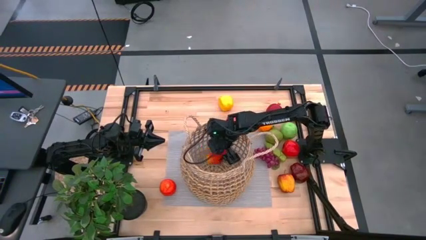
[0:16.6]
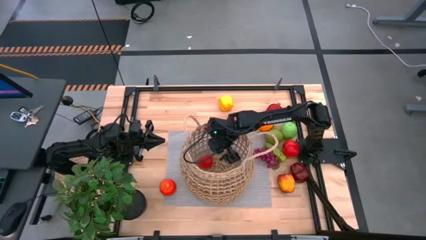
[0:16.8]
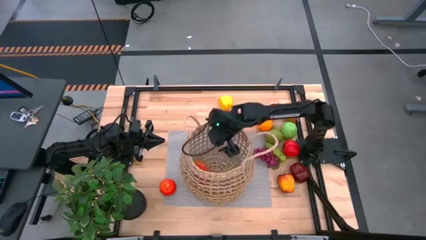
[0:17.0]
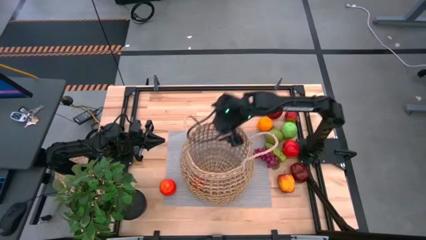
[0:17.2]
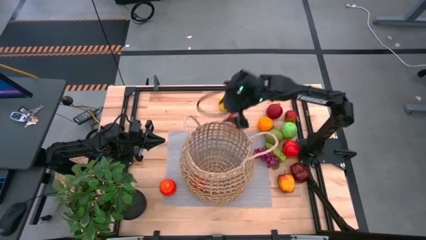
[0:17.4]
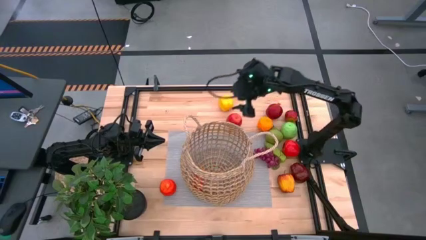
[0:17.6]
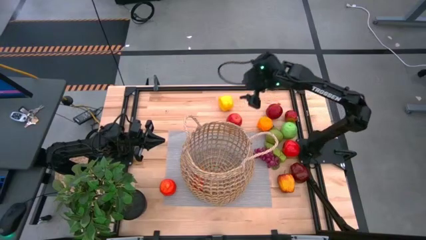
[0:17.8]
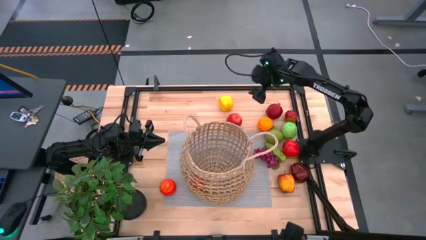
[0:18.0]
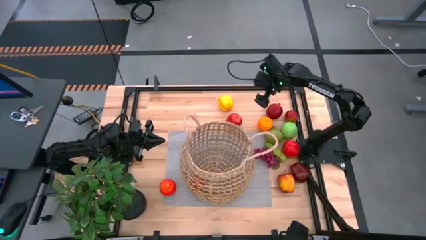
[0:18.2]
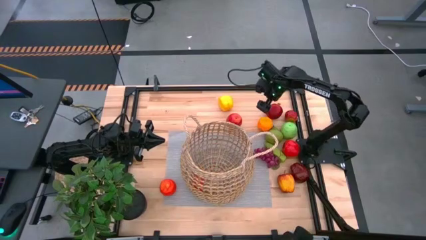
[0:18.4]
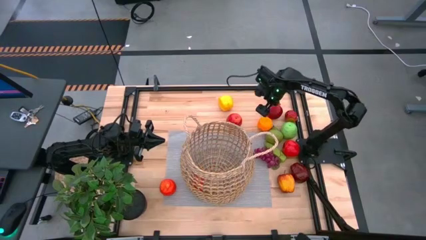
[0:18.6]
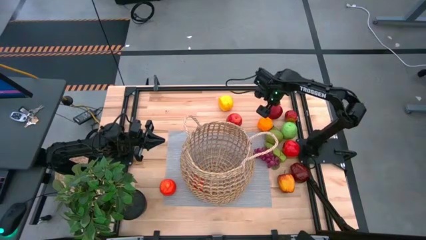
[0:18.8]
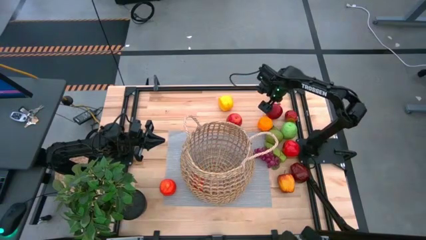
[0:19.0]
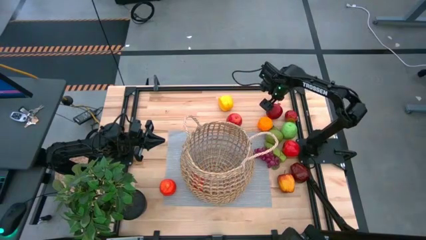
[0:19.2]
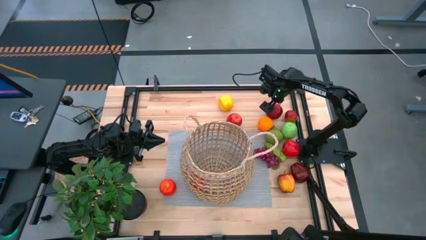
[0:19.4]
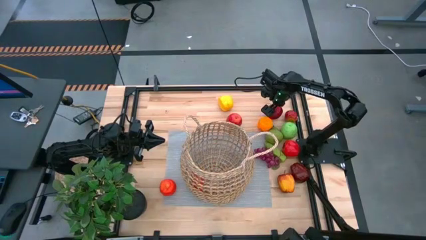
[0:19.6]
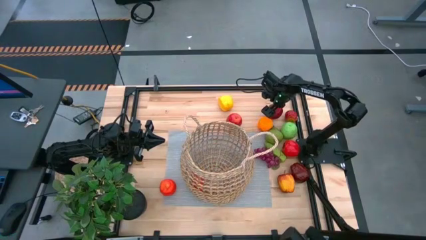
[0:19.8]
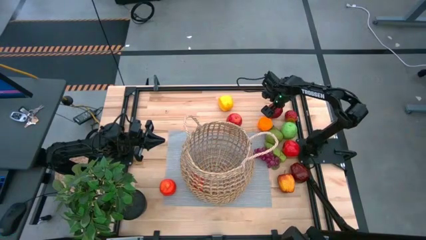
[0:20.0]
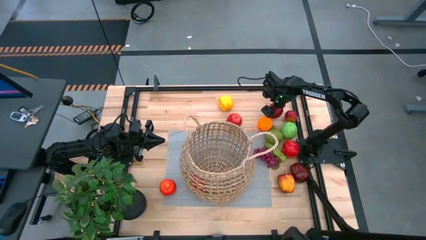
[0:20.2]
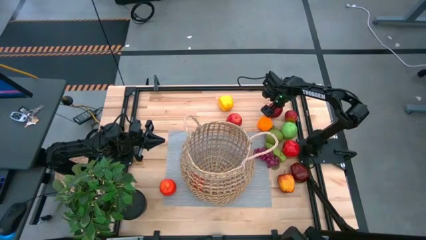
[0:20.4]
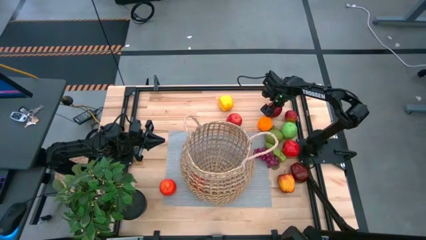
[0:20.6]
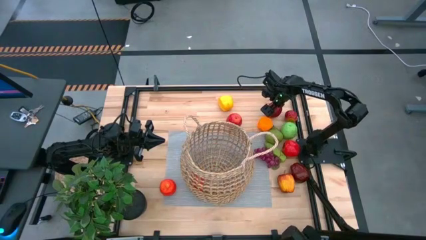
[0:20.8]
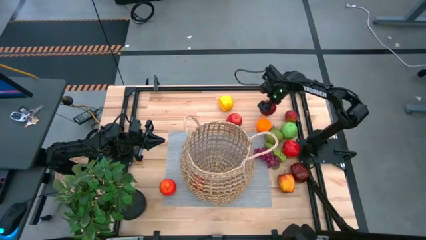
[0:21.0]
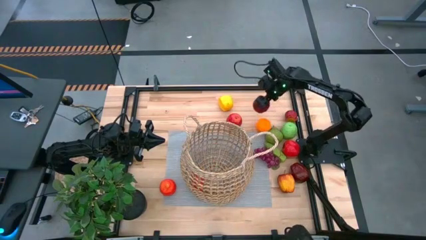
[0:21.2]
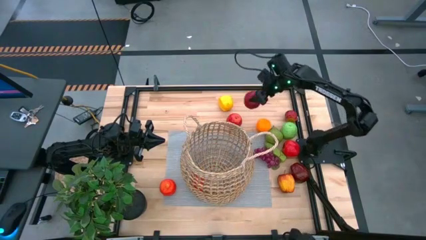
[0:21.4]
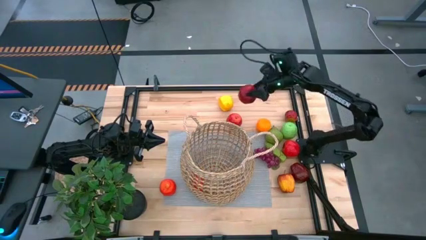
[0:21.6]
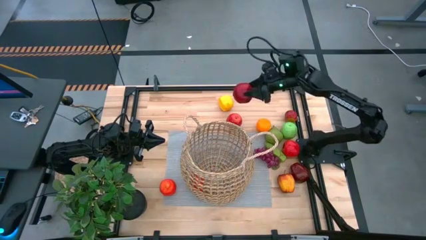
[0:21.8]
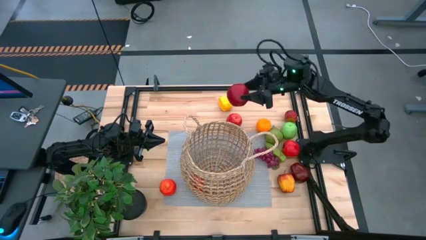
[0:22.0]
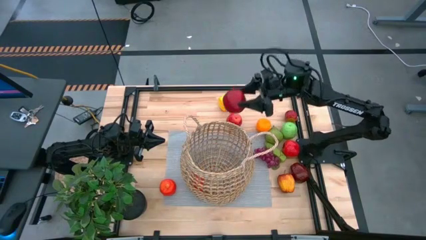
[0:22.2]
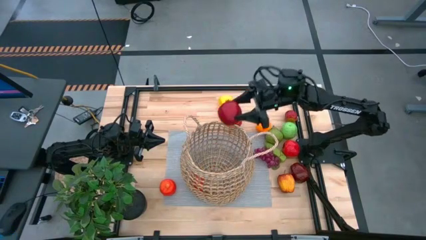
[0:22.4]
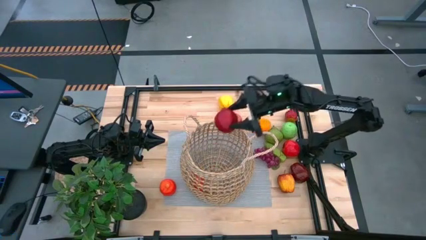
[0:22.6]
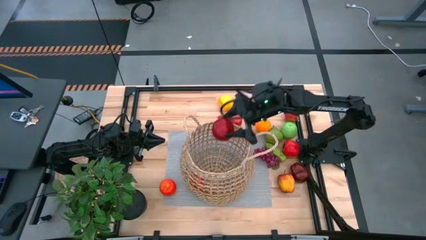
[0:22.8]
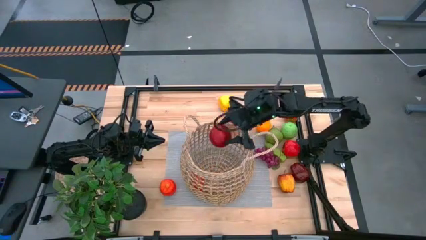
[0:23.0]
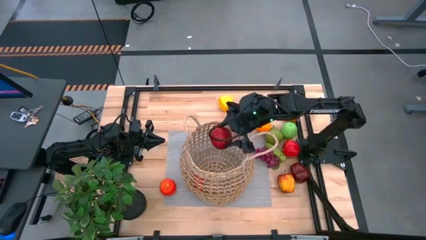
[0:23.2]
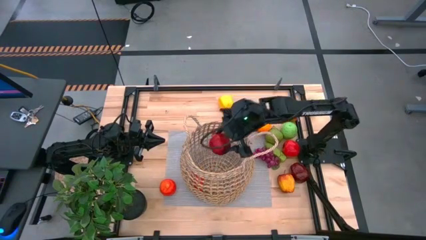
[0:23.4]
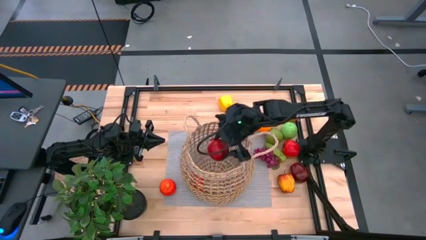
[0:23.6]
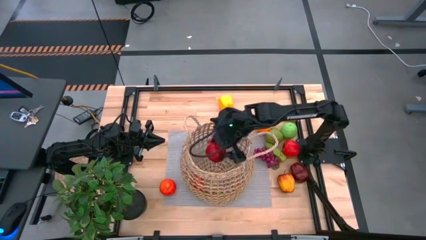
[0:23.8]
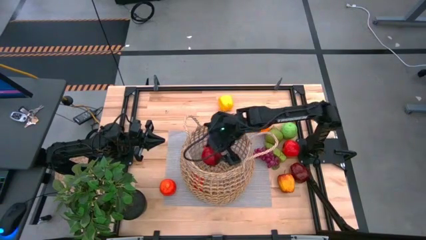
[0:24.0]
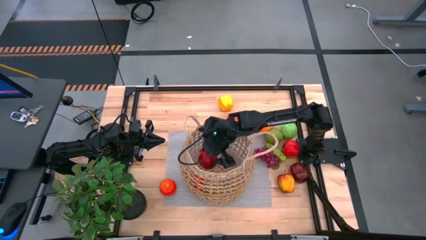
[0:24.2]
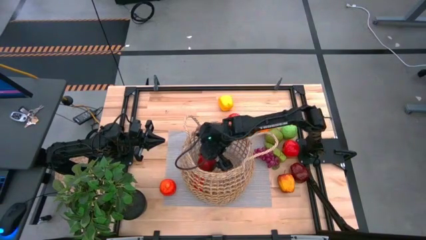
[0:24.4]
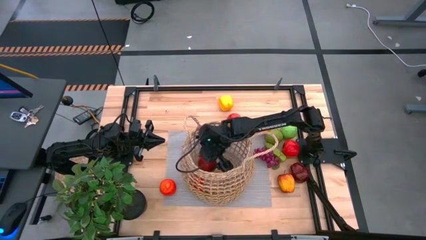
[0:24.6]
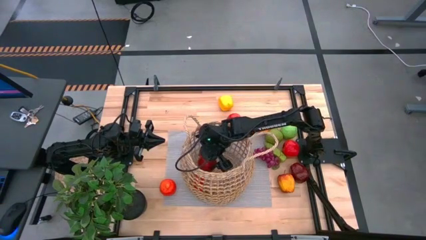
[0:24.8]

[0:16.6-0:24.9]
Task: Build produce basket
Put the red pomegranate into the brown basket

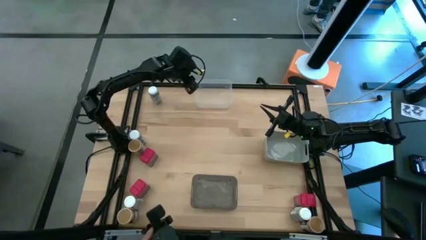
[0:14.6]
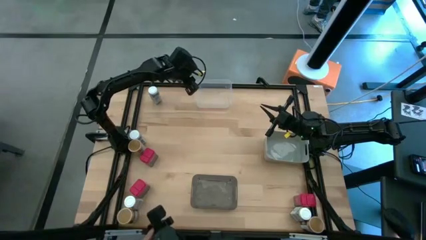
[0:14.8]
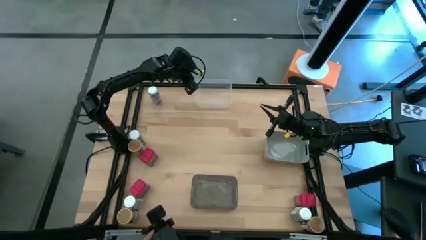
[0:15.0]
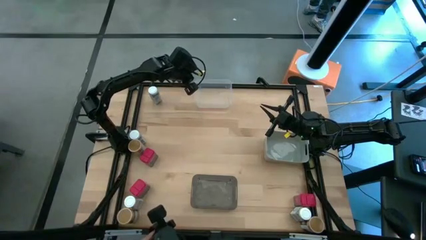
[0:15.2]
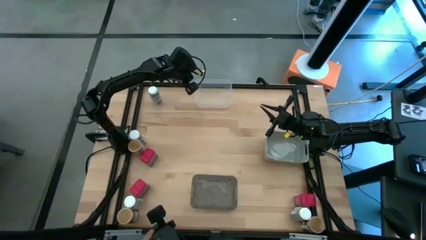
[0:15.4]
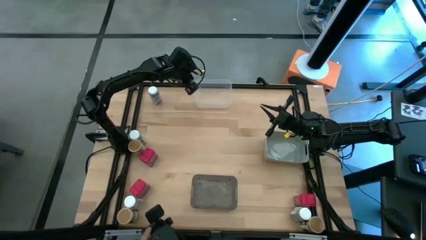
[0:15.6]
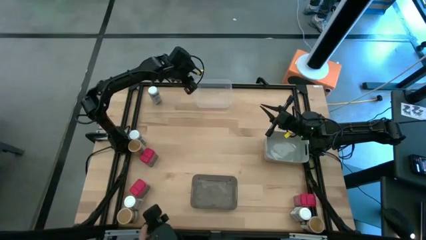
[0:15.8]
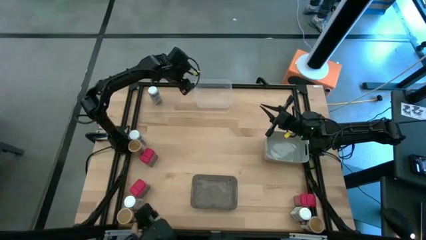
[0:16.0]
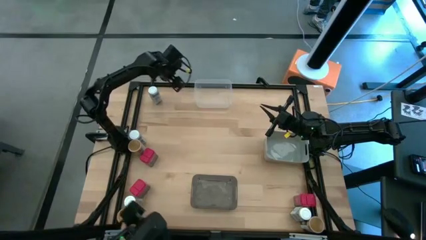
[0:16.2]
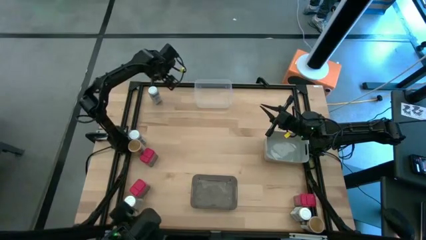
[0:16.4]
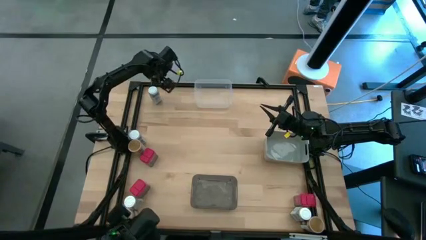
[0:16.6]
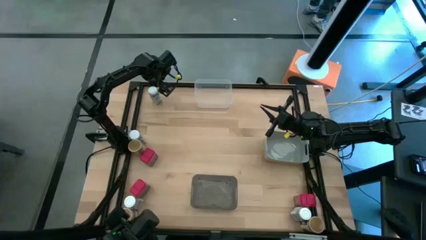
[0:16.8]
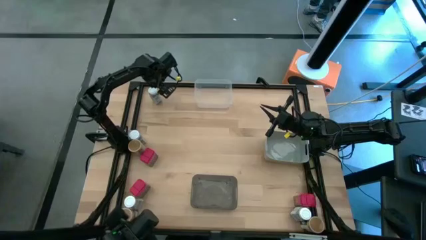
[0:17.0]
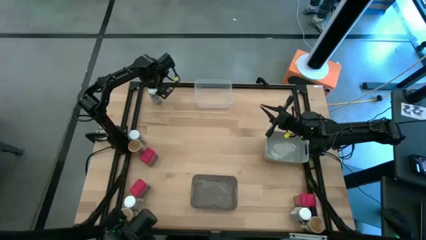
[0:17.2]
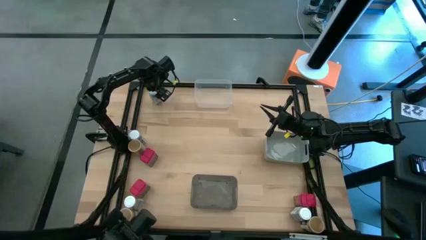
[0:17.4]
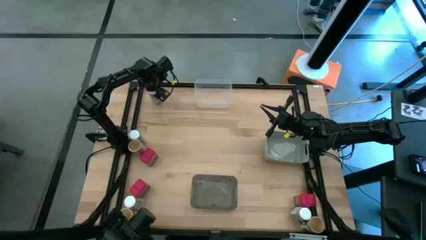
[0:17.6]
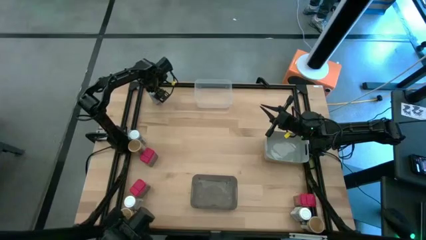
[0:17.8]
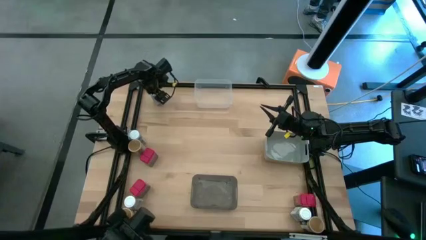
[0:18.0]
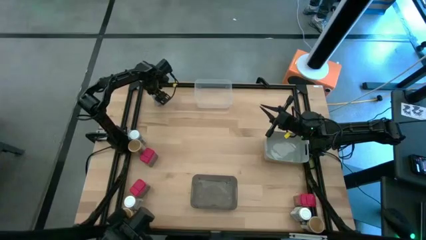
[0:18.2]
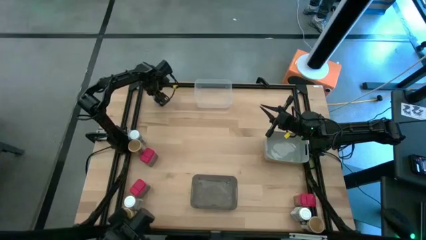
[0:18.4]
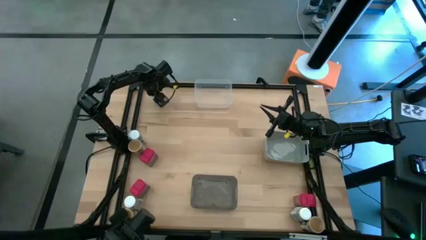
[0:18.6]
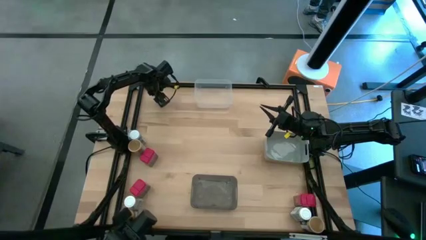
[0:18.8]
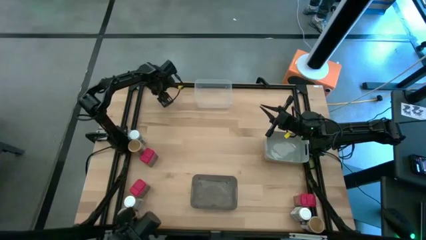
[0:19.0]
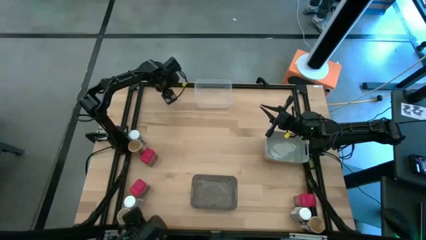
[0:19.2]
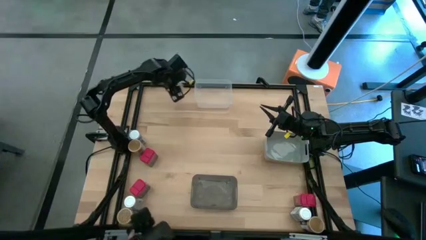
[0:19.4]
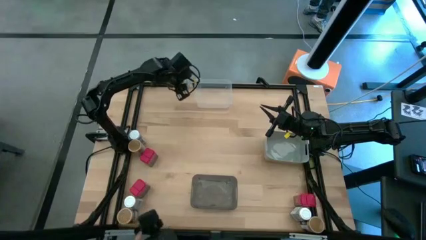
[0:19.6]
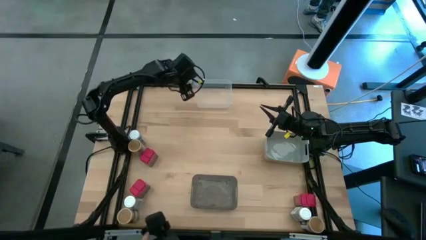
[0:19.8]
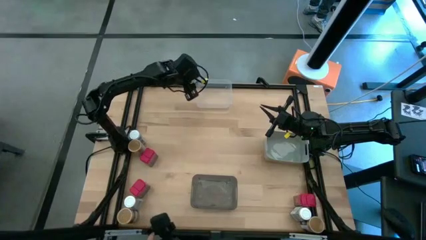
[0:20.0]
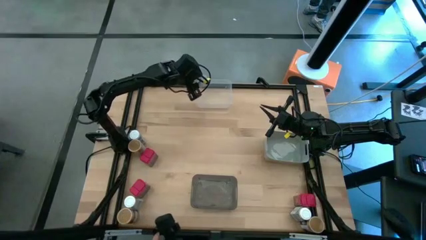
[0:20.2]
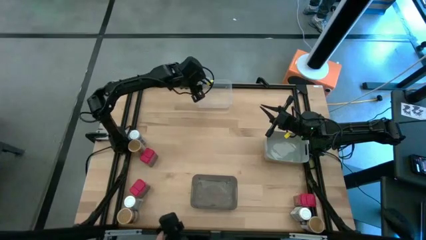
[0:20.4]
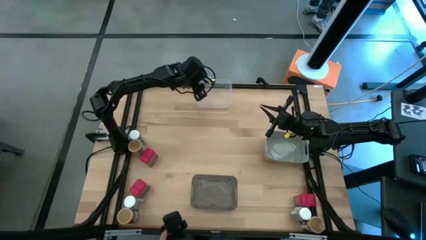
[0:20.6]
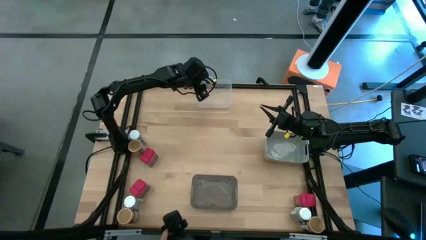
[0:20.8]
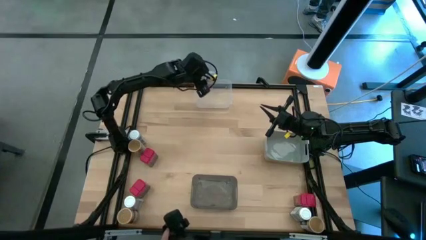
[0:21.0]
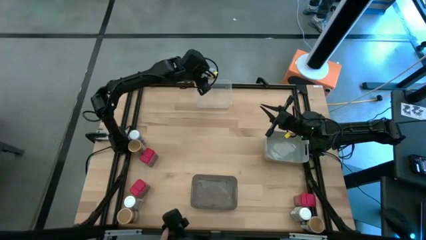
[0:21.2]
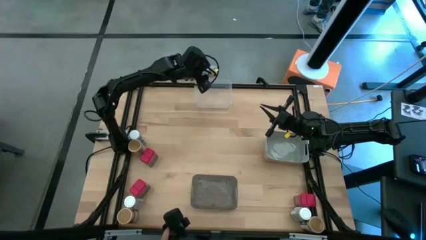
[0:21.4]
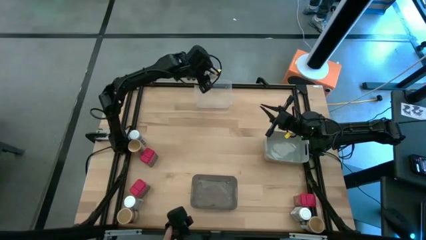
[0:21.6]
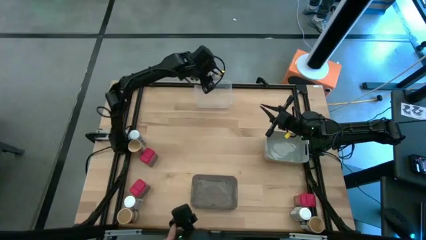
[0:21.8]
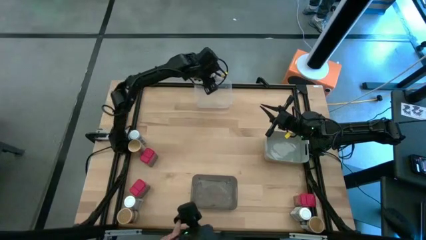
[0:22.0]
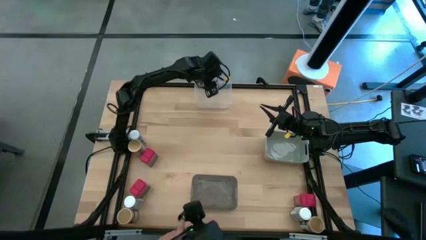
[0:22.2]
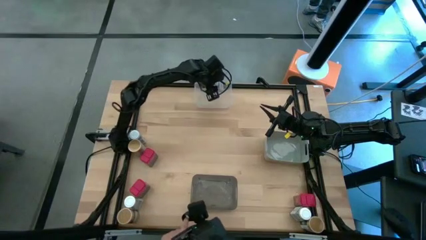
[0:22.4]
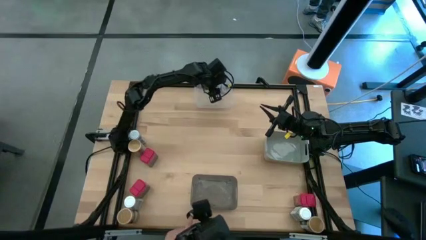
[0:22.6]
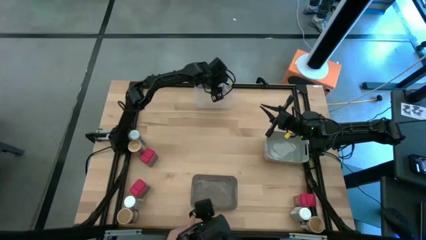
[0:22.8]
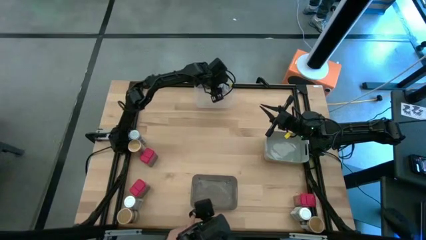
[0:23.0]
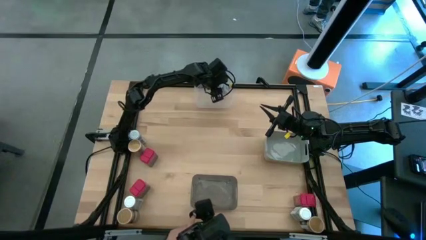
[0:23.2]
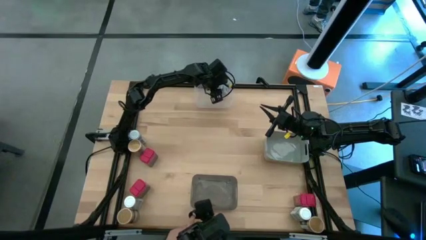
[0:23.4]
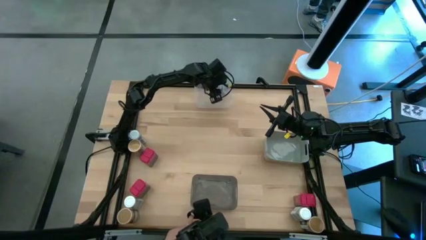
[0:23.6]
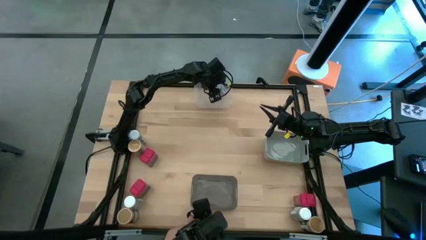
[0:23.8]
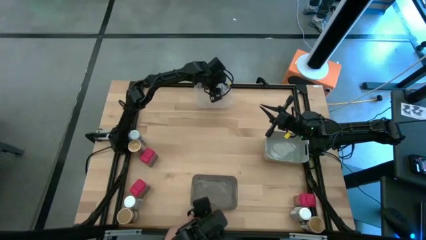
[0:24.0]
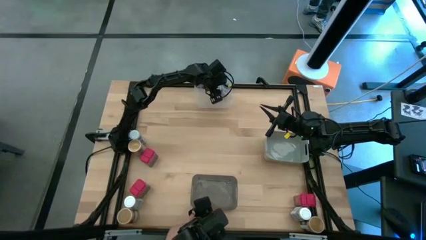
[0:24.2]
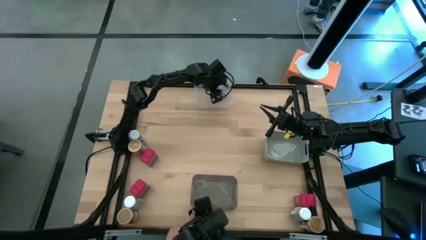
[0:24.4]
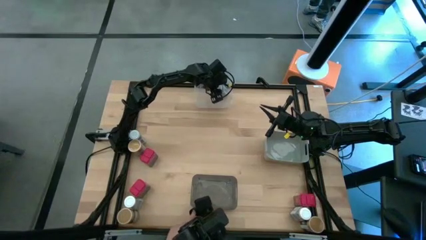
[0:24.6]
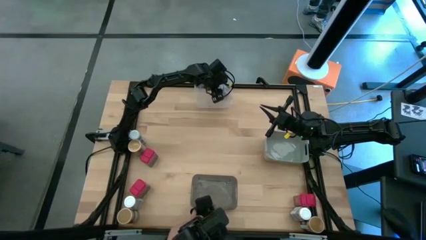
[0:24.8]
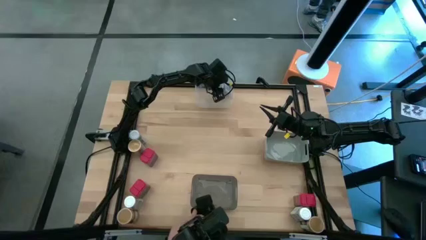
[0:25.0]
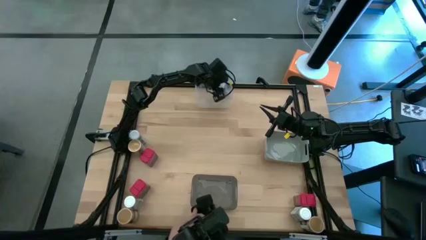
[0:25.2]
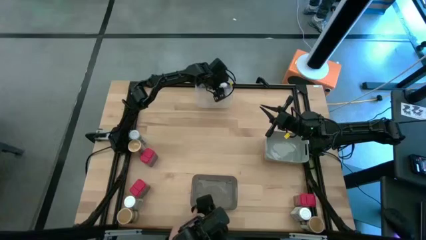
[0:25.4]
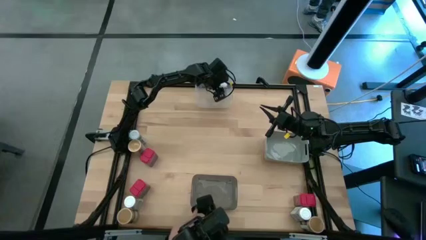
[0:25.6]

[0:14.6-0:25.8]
Task: Sort spices by type
Put the white seasoning bottle into the transparent bin
